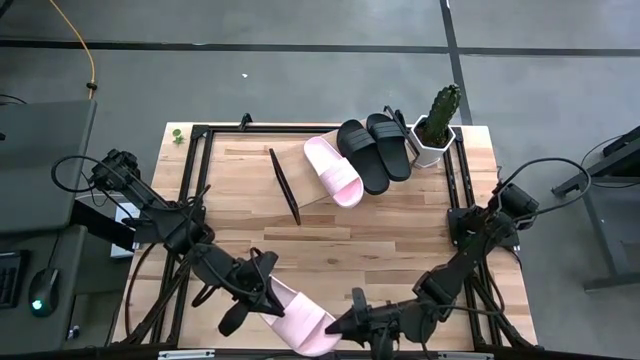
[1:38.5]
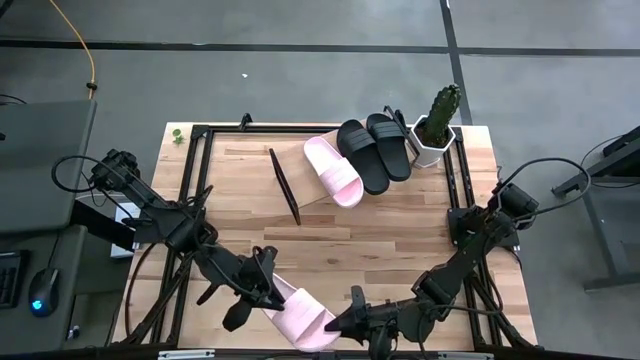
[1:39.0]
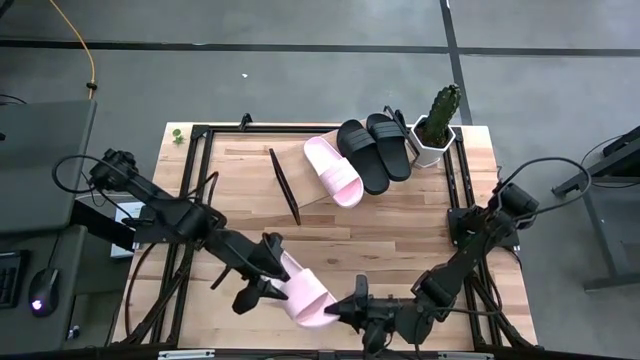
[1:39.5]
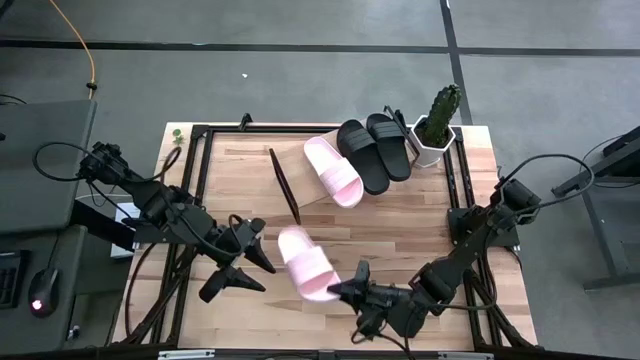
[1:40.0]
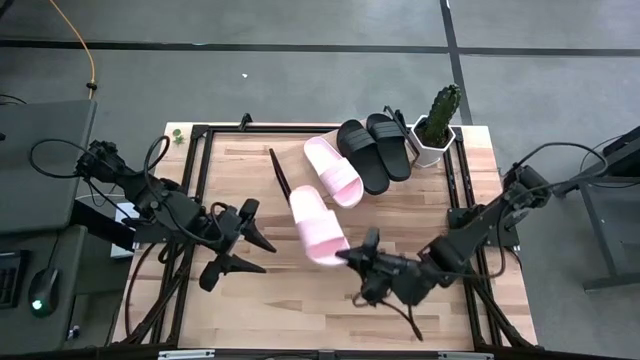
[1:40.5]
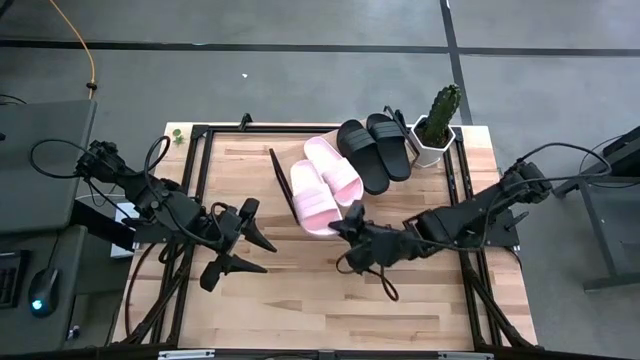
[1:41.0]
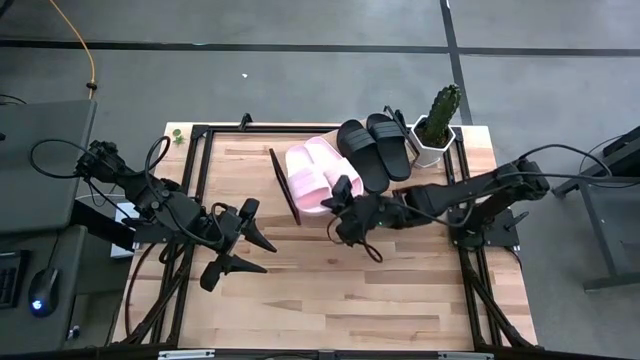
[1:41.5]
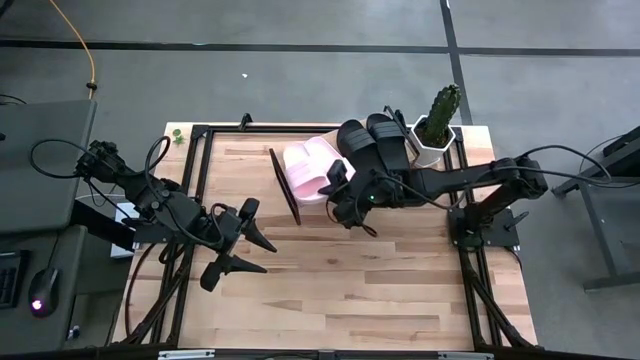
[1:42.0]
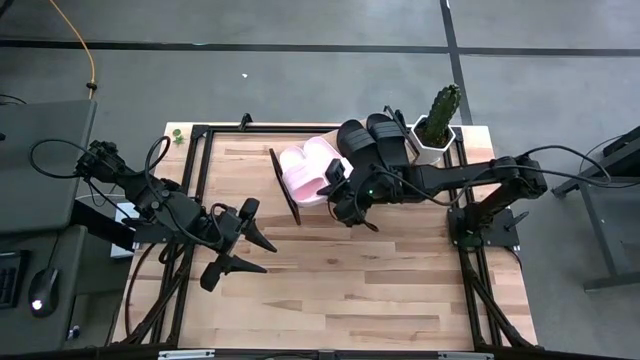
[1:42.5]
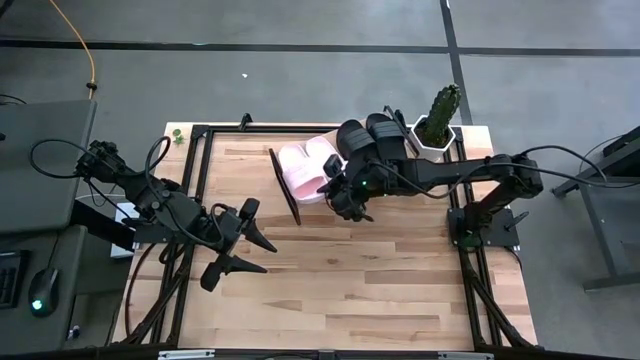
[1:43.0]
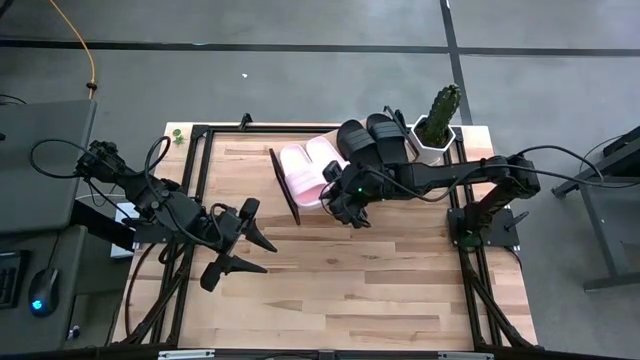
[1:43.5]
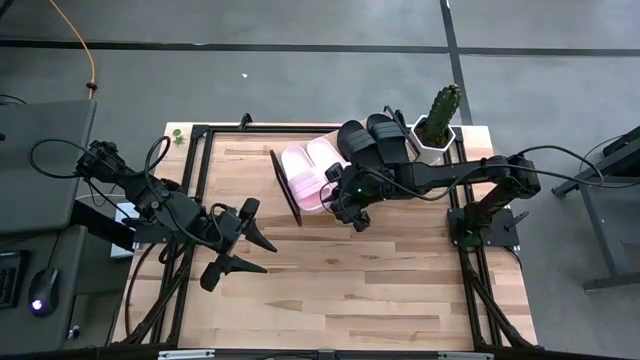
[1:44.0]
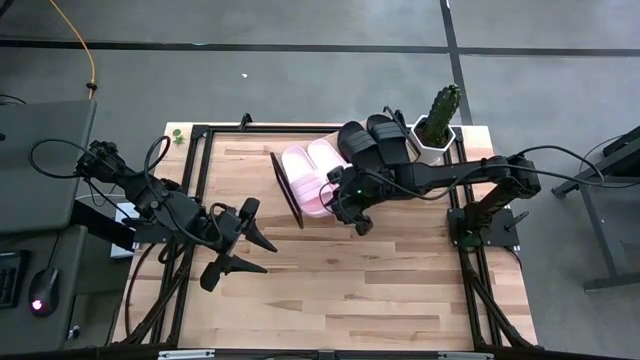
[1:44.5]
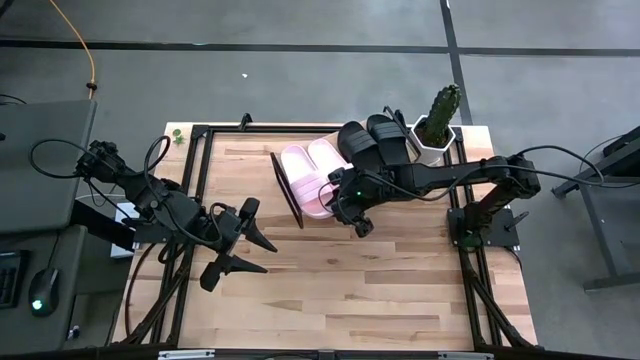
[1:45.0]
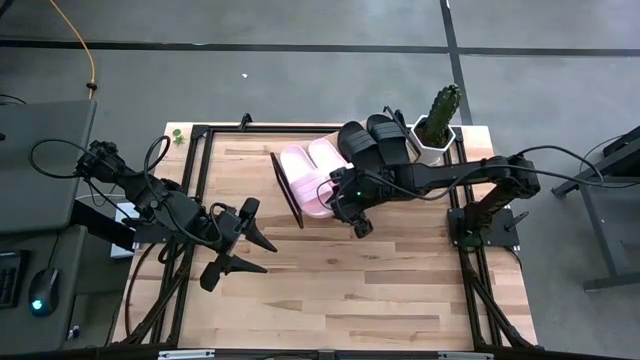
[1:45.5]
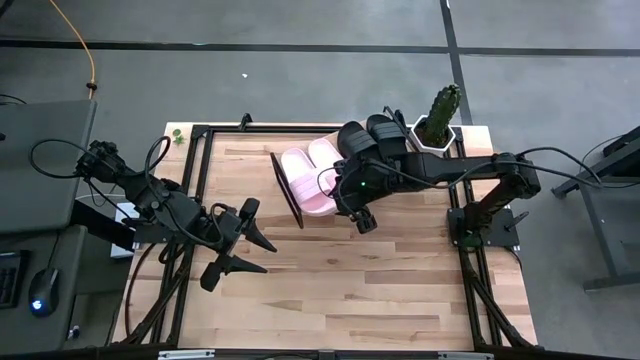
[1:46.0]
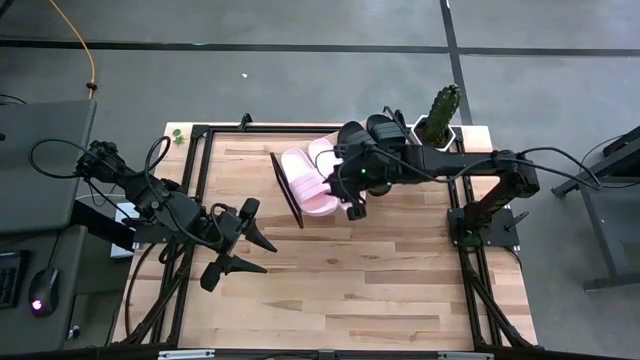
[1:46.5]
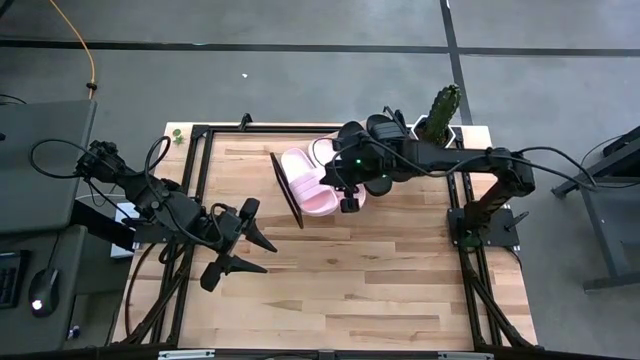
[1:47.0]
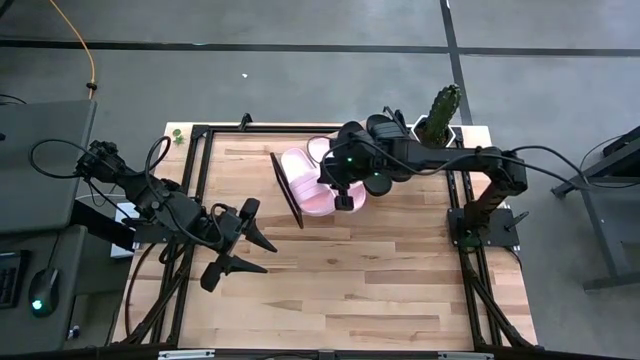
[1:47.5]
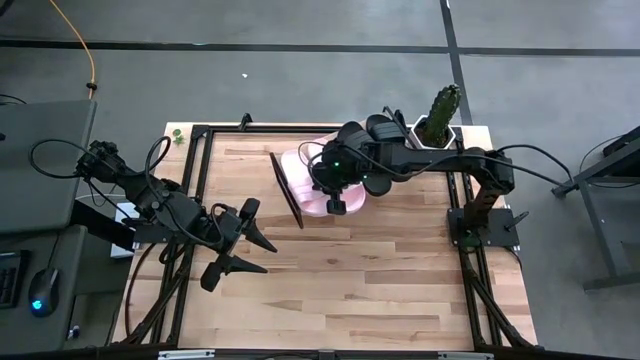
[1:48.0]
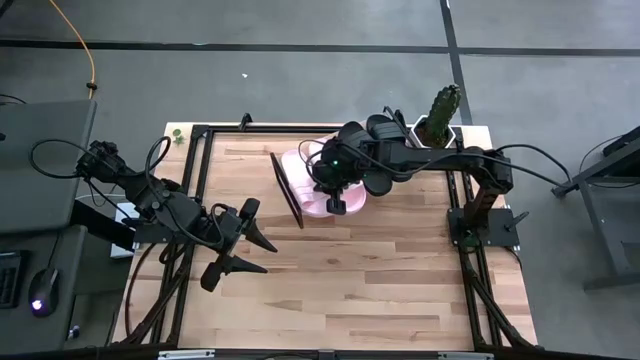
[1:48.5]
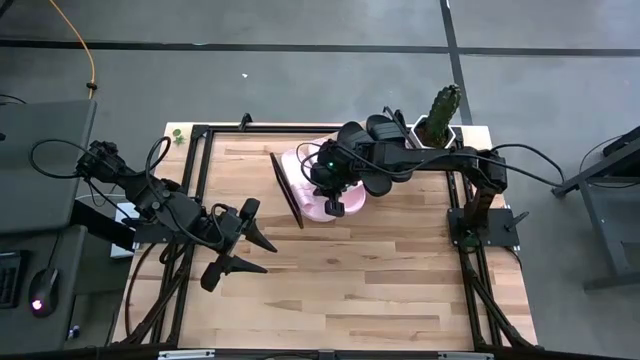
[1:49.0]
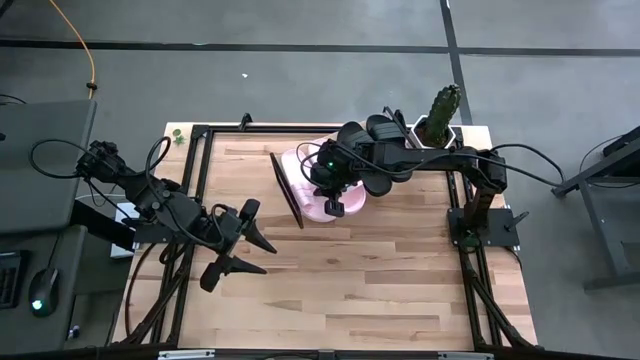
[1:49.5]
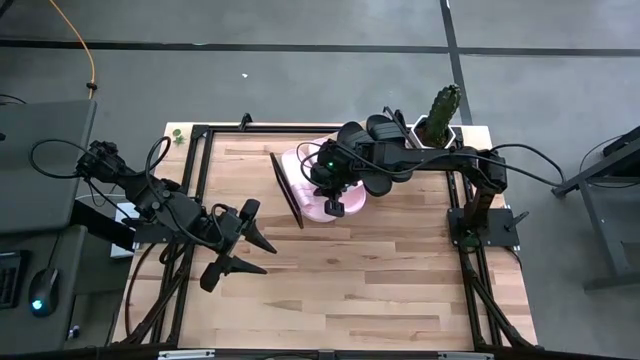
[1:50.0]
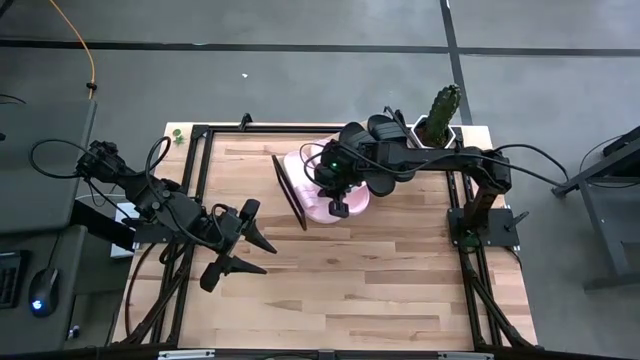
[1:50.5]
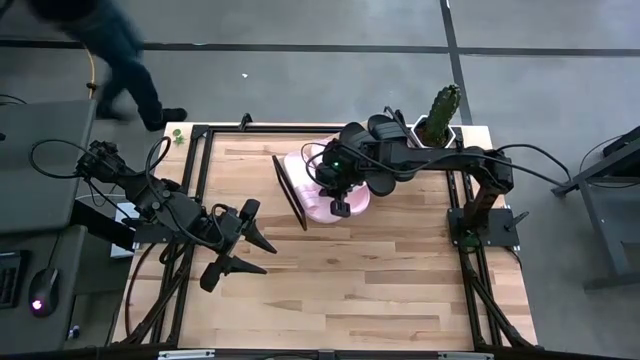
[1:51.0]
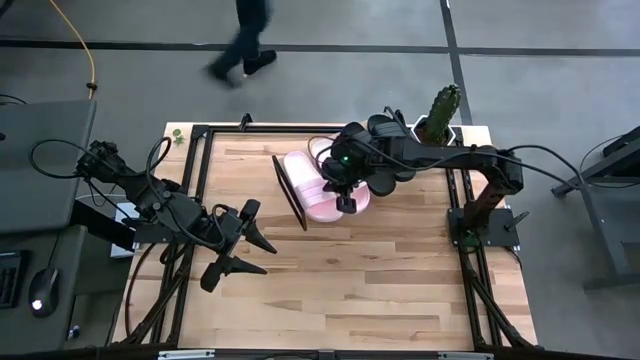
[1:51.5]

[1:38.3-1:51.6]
Task: Pick and place slides into the shelf
Put the pink slide on the shelf
